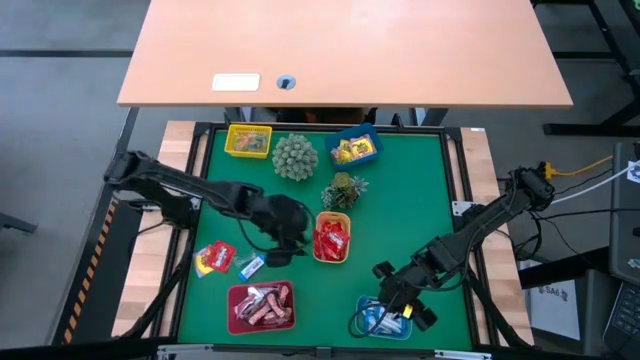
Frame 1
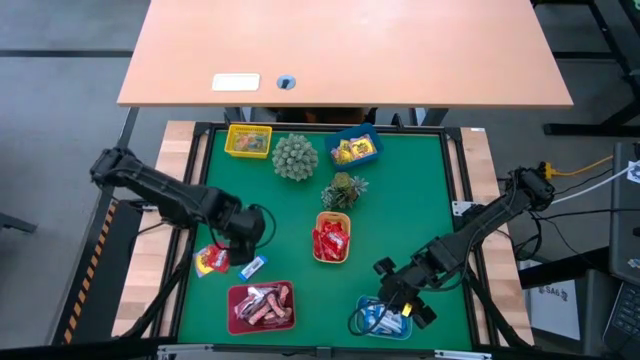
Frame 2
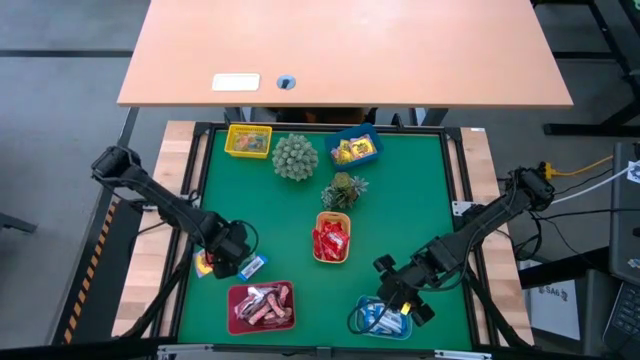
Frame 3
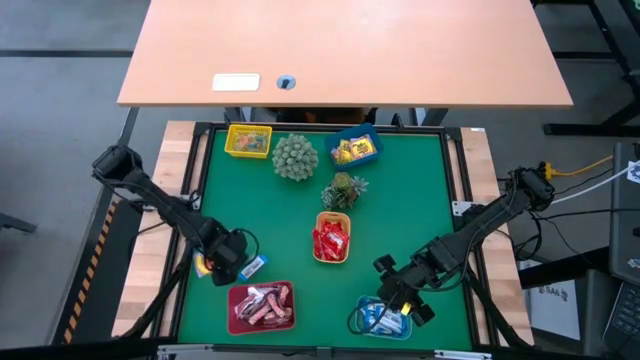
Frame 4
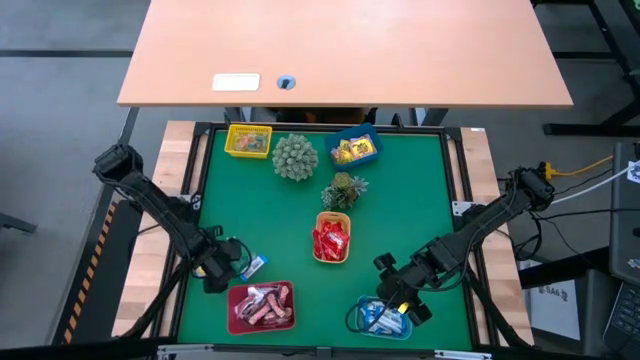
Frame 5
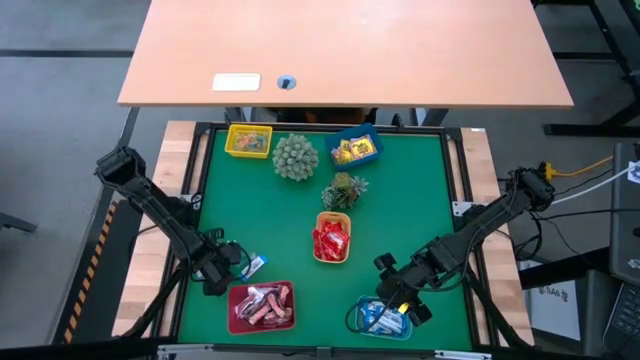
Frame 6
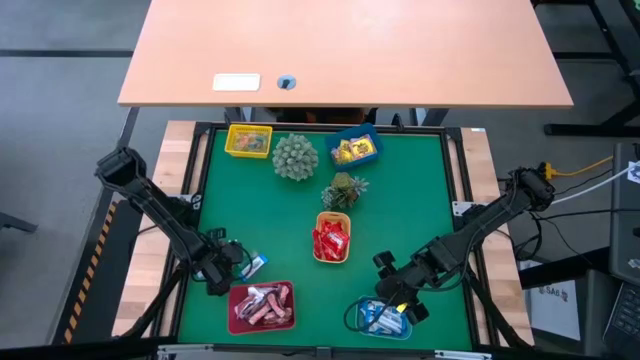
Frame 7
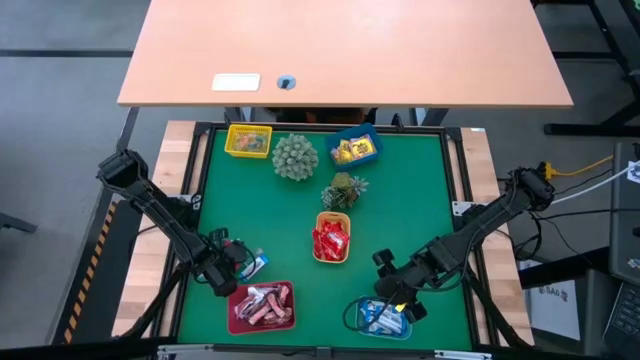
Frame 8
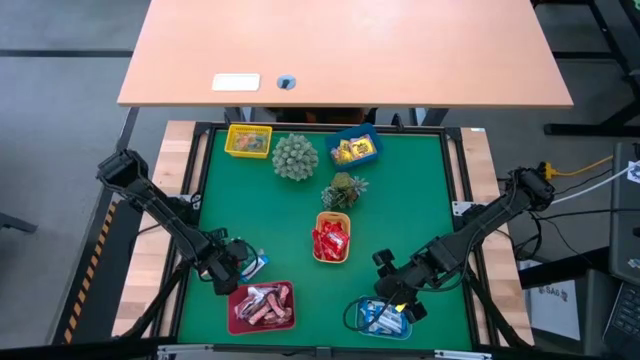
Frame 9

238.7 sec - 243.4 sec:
Task: Sort candy
Put the red candy into the light orange bin

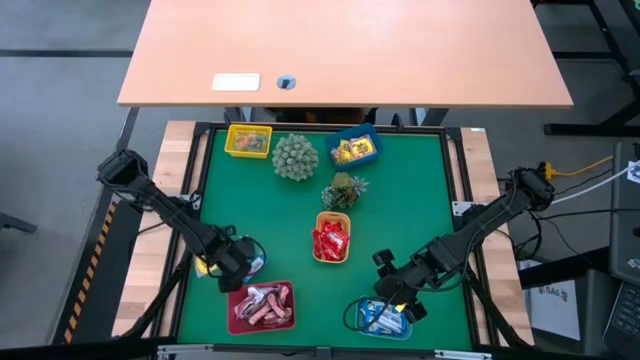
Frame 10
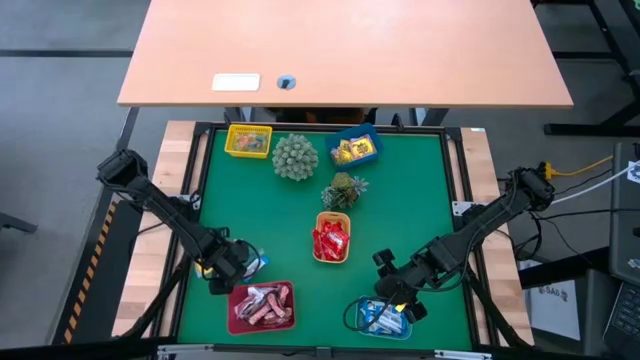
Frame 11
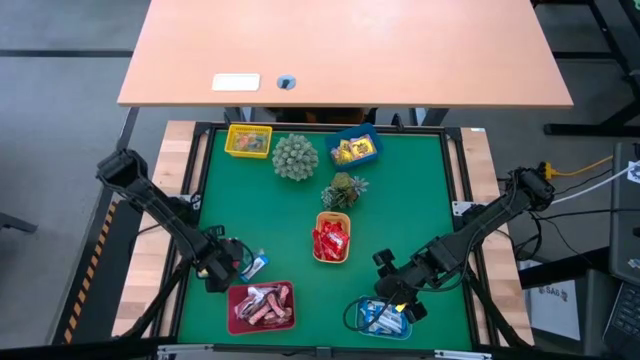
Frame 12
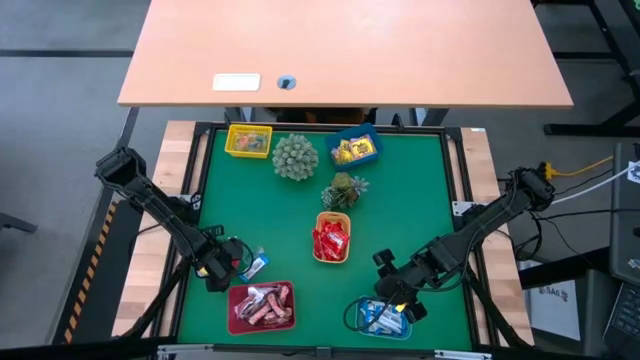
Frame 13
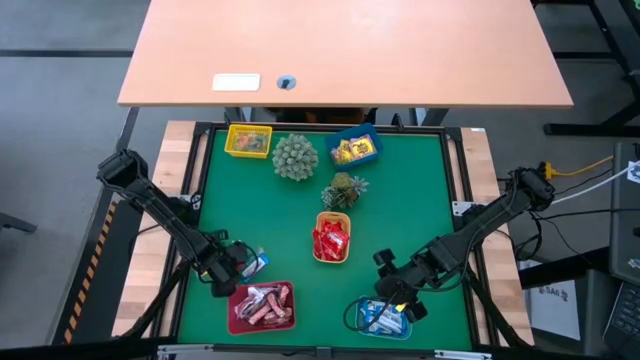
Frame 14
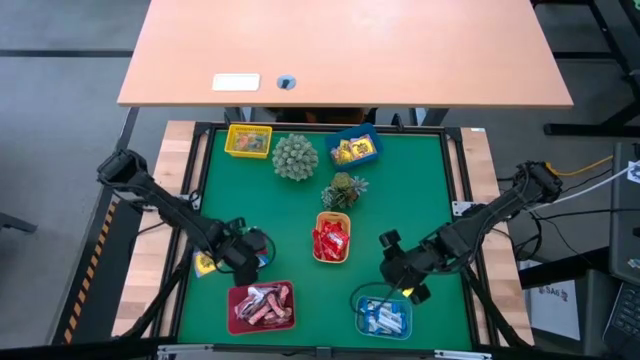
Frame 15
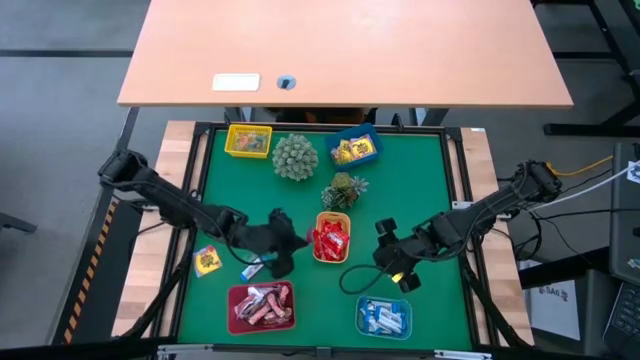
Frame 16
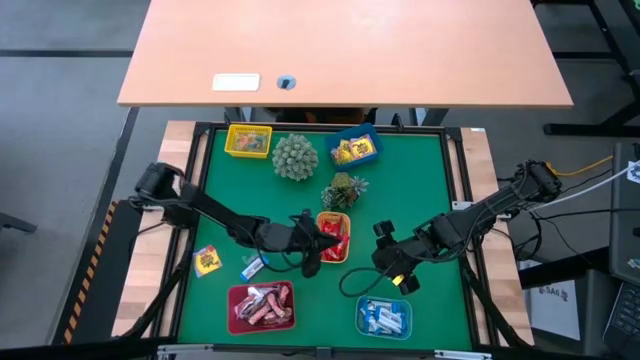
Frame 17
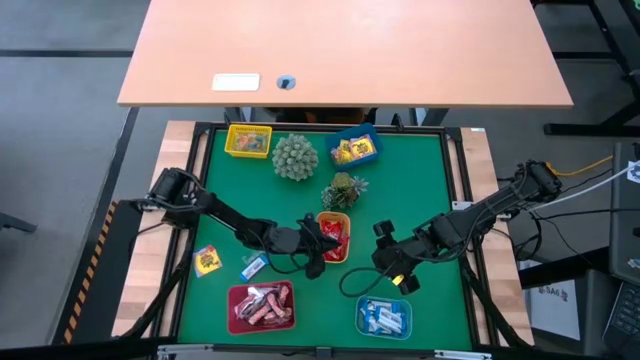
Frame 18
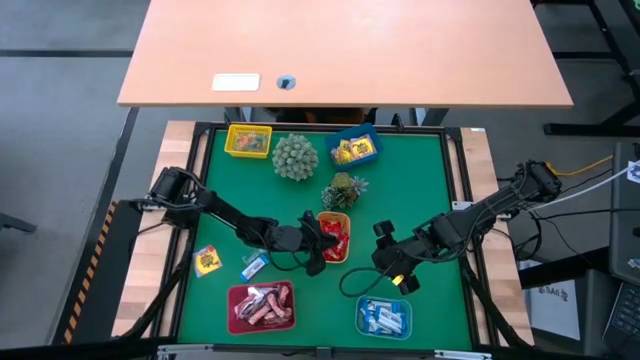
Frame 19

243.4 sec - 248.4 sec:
Put the red candy into the light orange bin

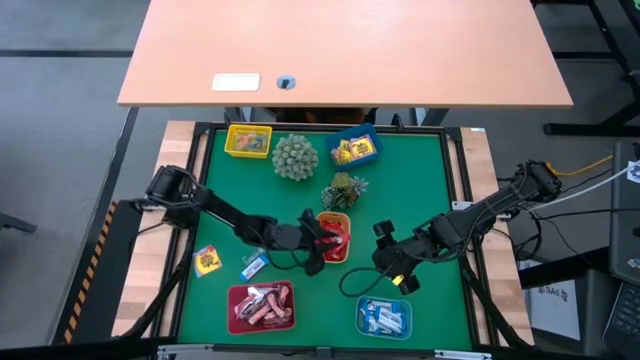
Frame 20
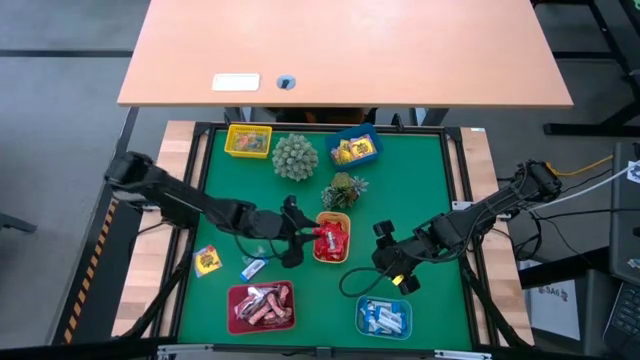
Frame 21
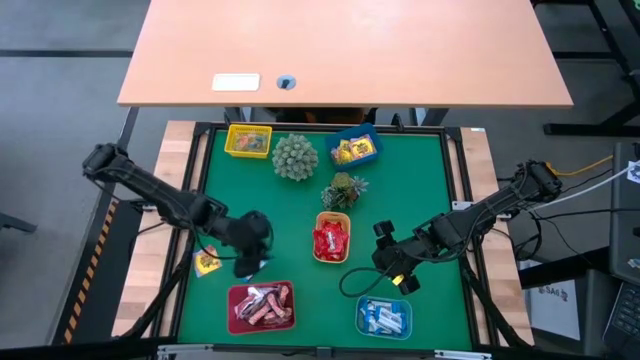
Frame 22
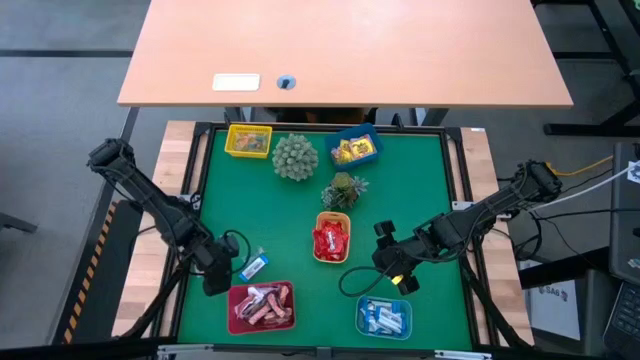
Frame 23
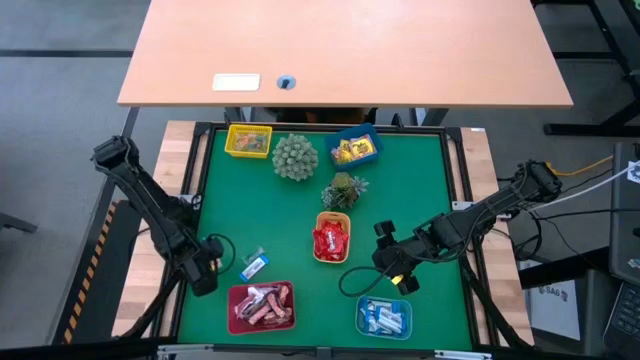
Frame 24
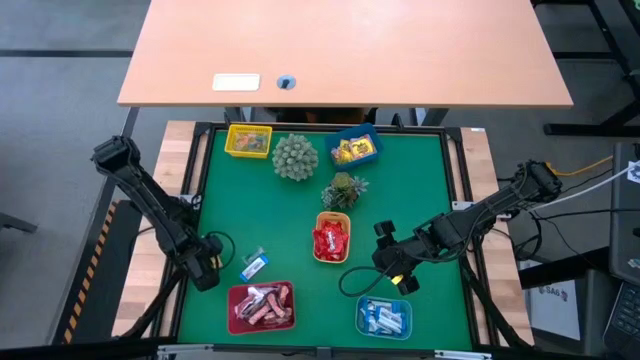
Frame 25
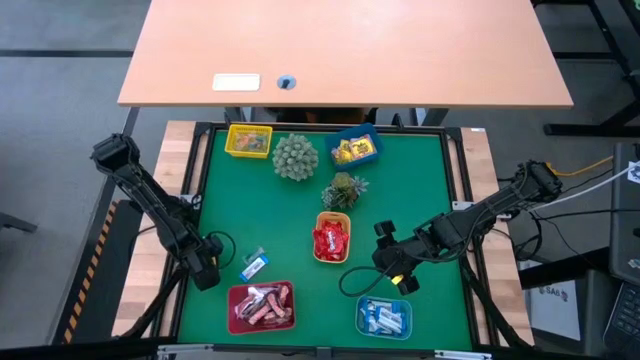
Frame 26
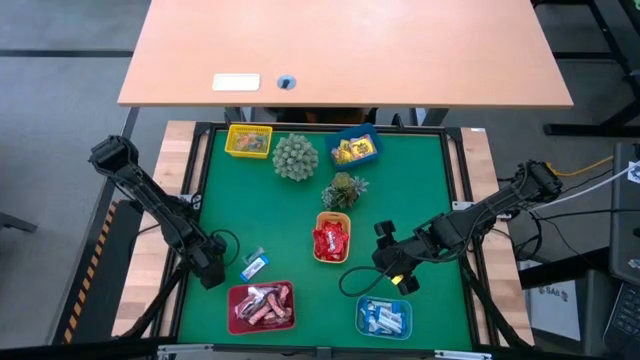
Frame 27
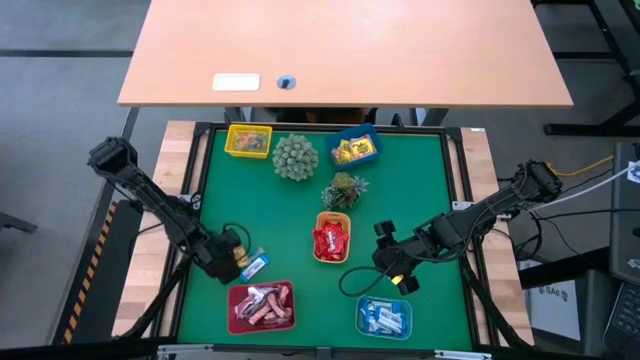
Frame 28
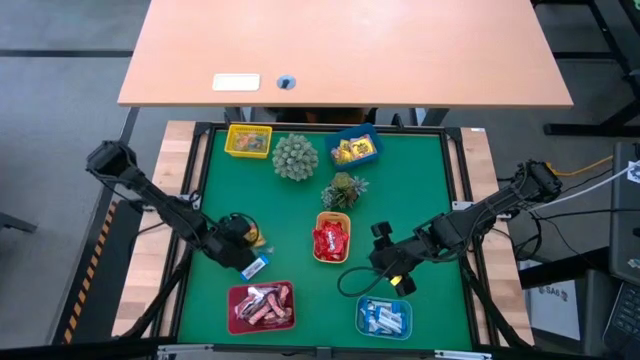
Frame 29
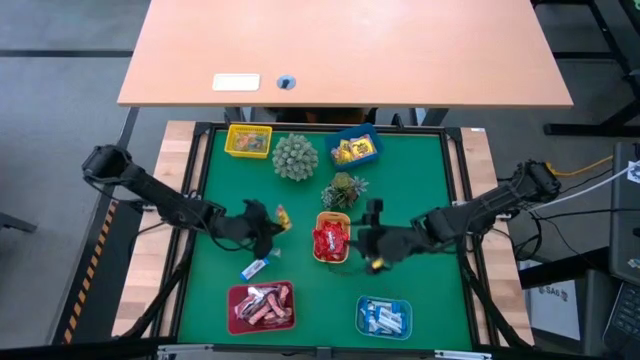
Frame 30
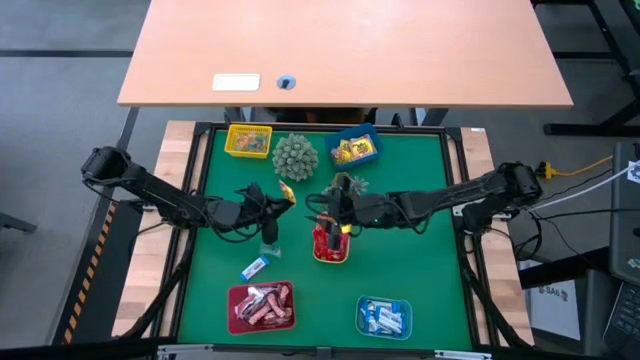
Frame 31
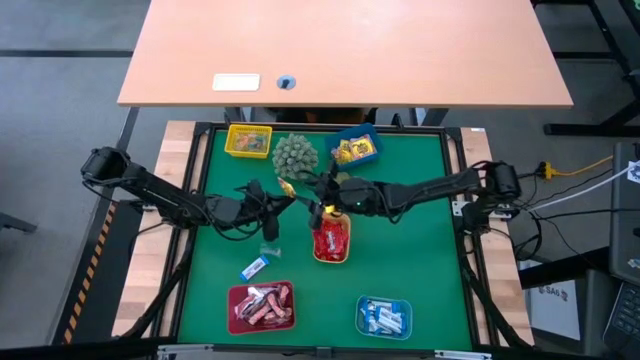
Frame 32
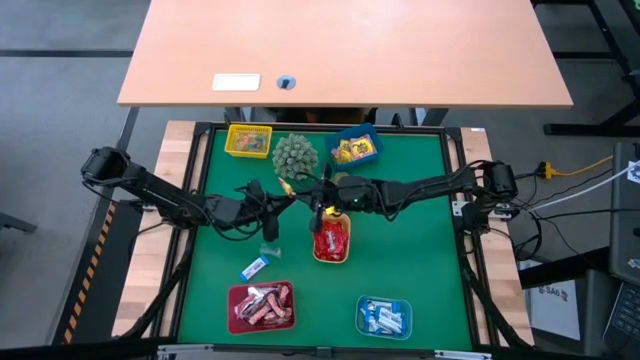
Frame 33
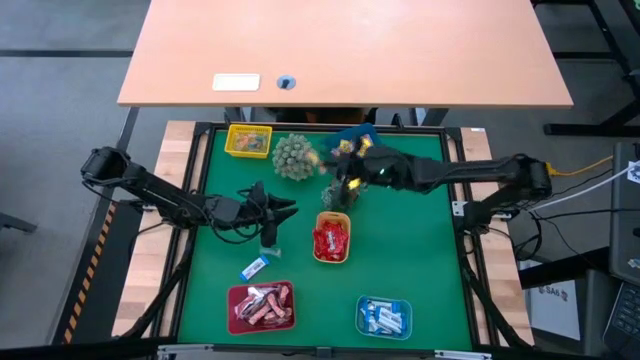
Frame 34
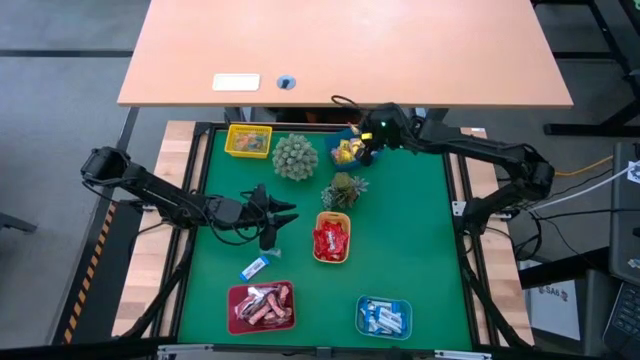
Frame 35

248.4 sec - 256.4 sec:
Put the yellow candy into the blue bin

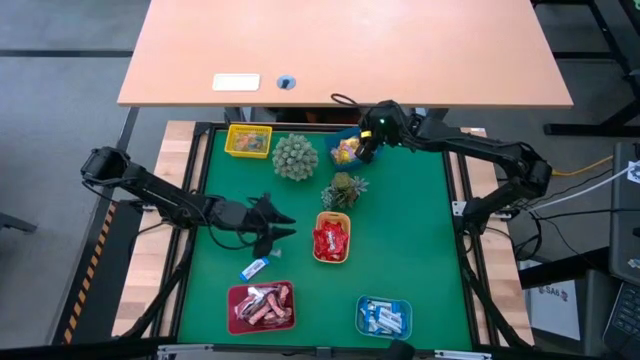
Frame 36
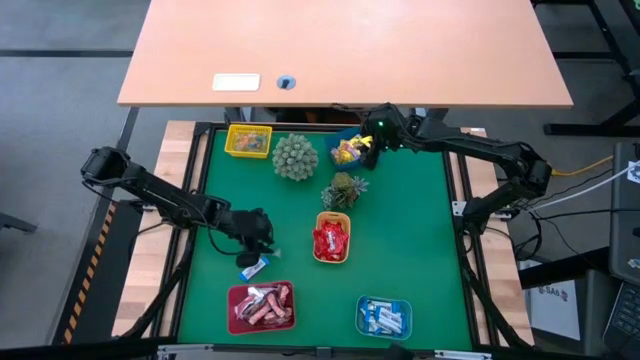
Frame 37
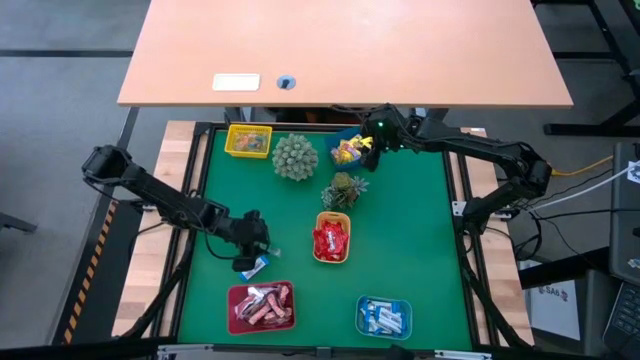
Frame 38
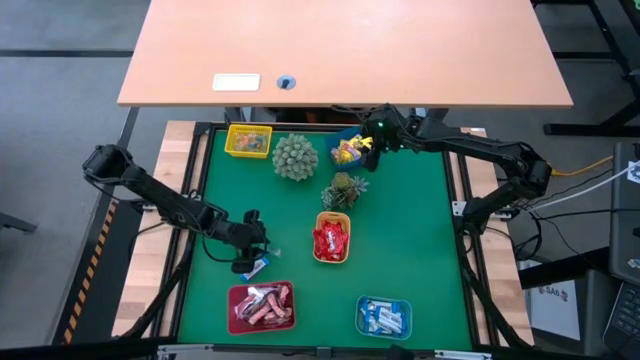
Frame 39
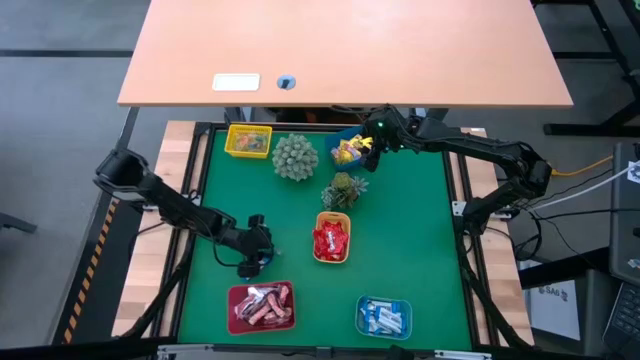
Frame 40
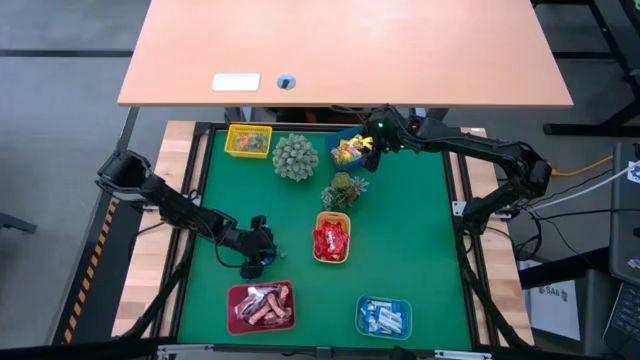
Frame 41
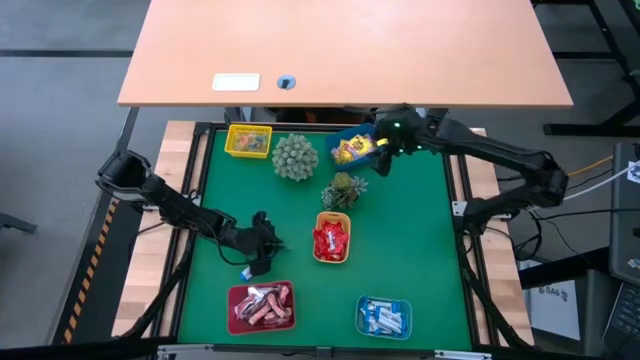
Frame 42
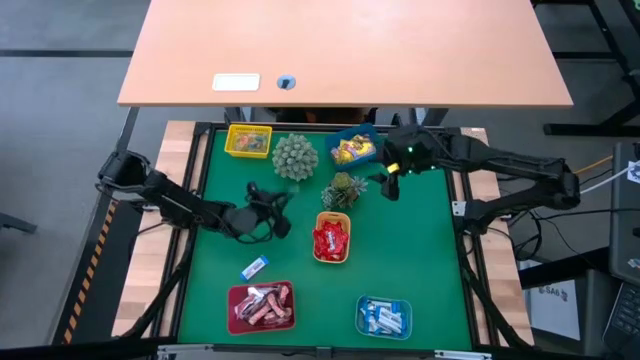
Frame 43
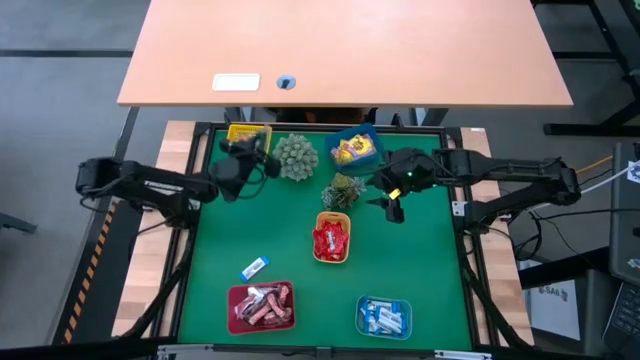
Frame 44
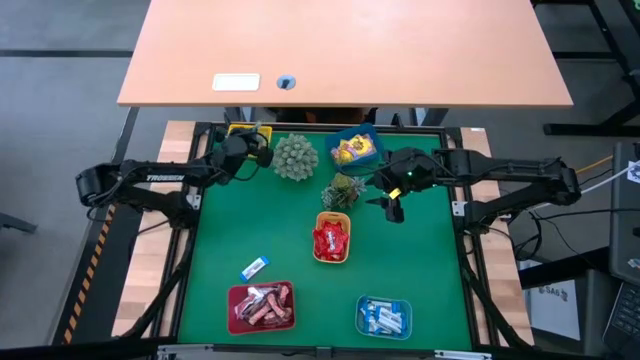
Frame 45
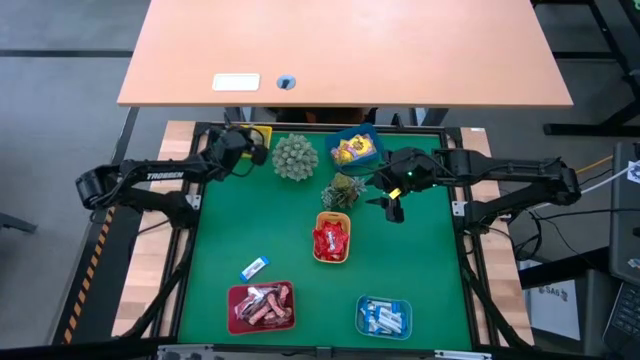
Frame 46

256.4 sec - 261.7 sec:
Put the blue gummy into the yellow bin
